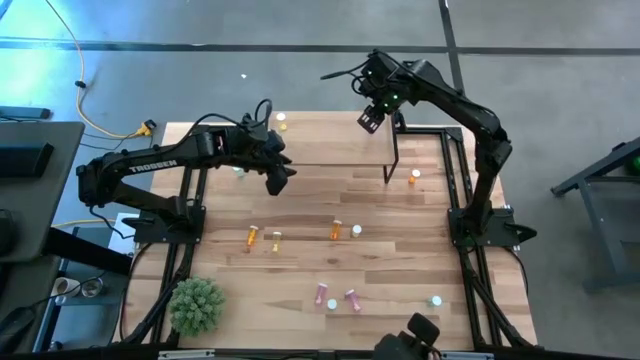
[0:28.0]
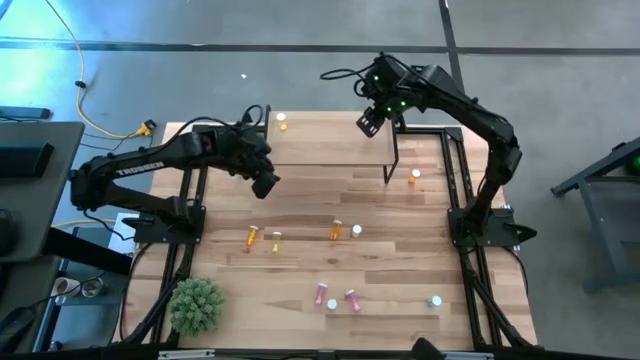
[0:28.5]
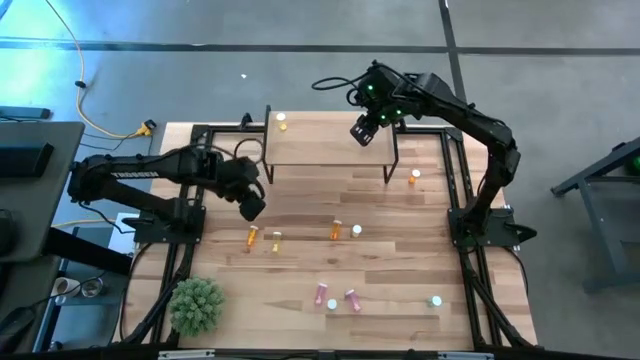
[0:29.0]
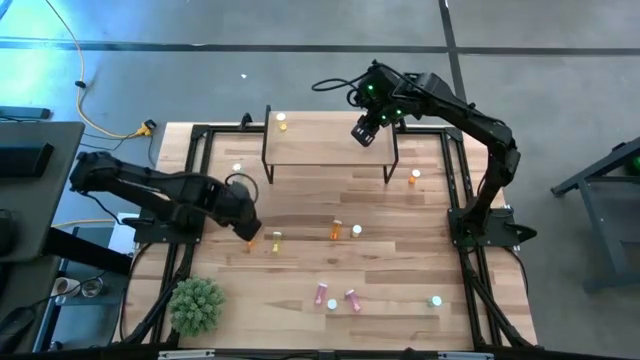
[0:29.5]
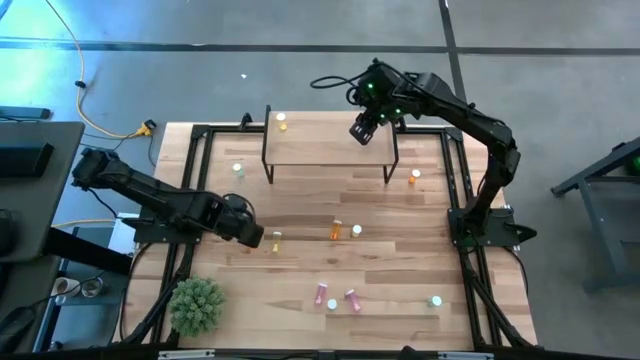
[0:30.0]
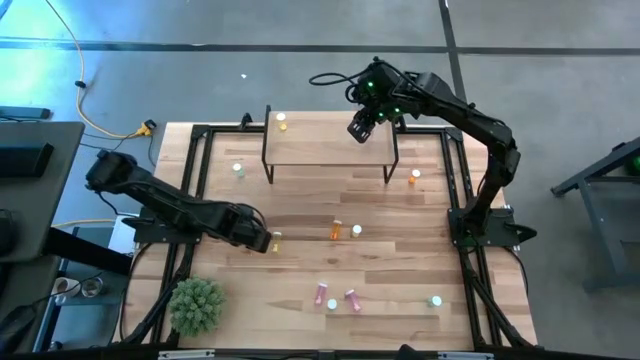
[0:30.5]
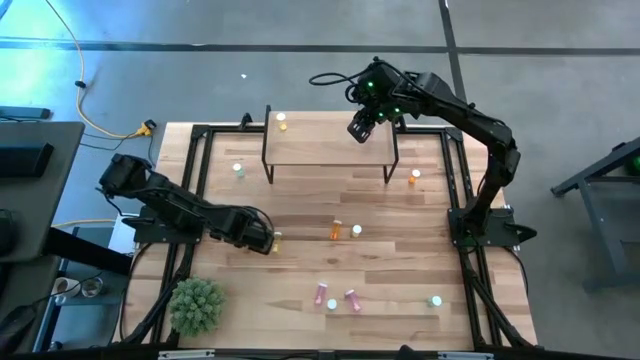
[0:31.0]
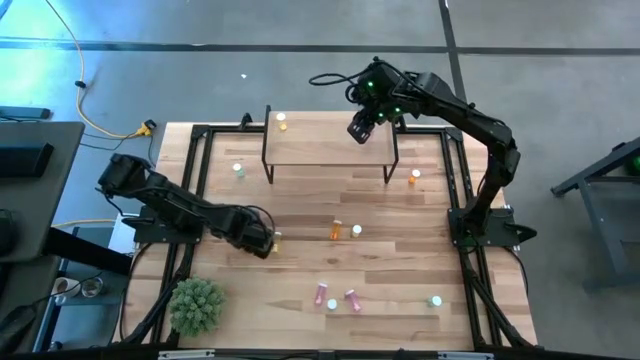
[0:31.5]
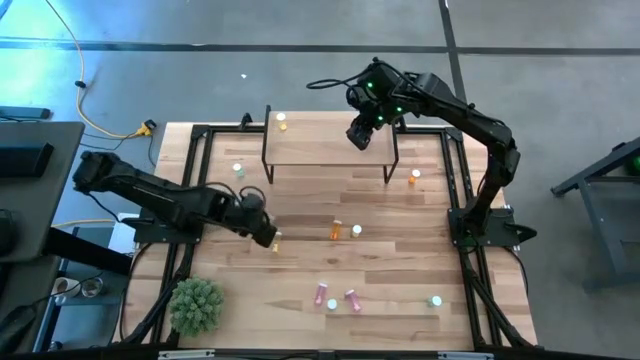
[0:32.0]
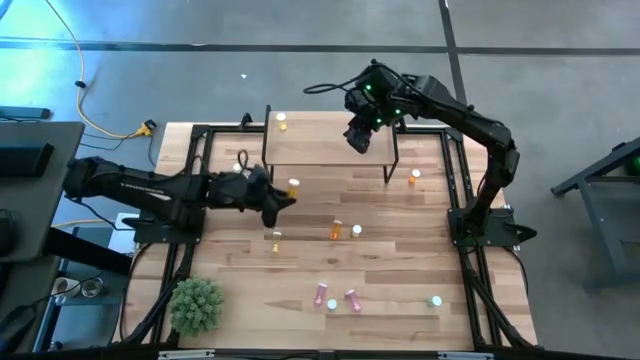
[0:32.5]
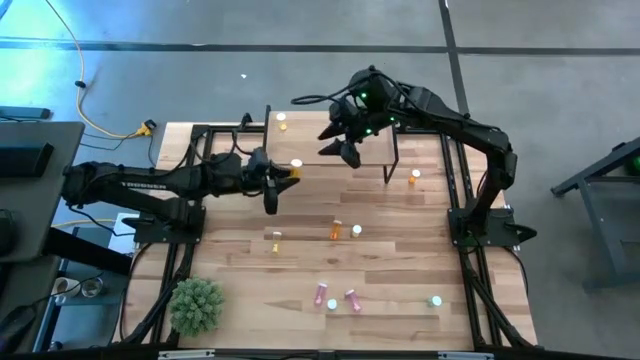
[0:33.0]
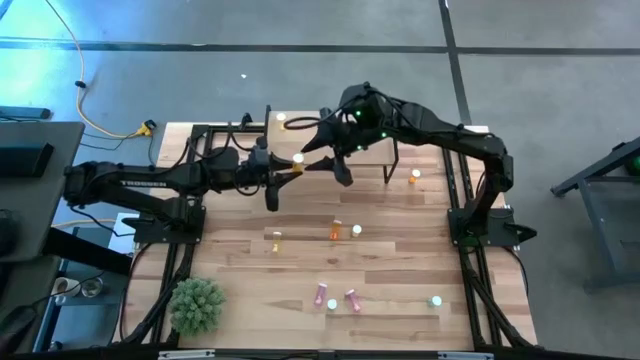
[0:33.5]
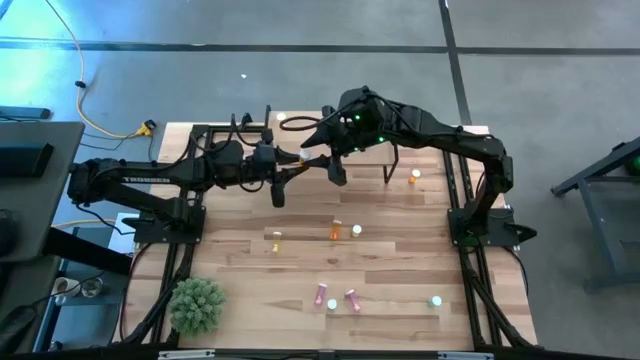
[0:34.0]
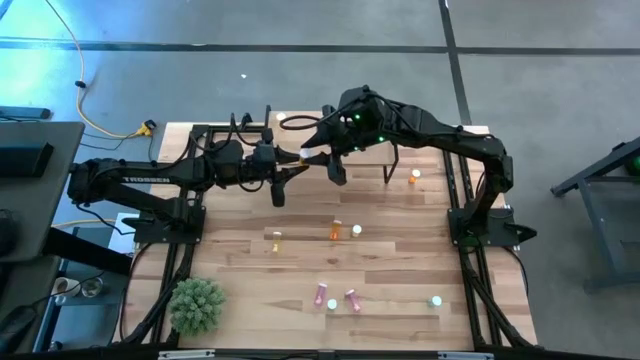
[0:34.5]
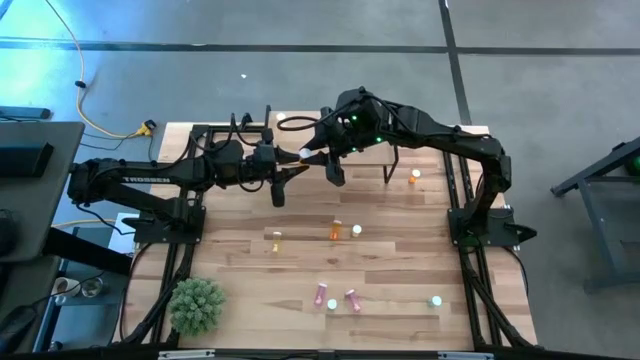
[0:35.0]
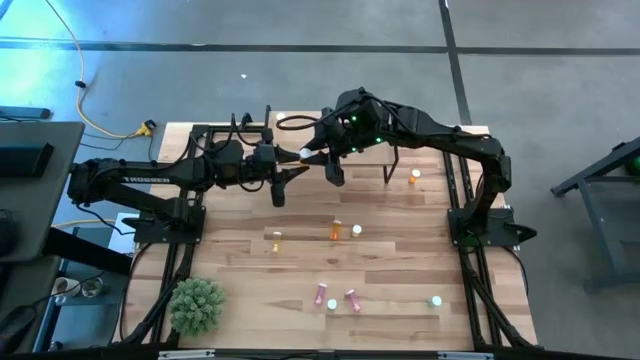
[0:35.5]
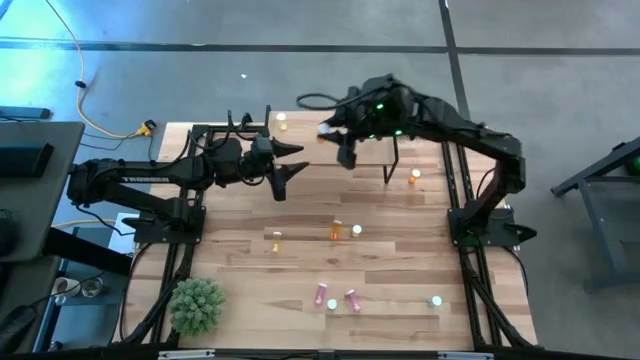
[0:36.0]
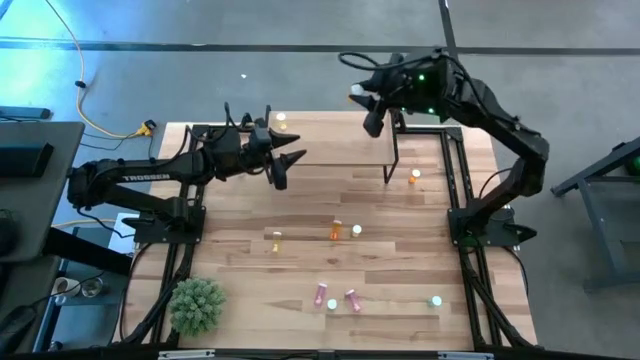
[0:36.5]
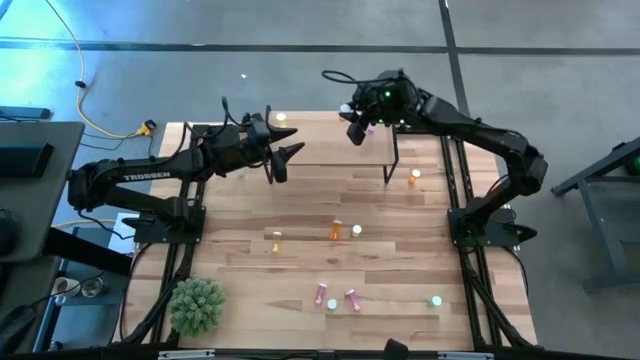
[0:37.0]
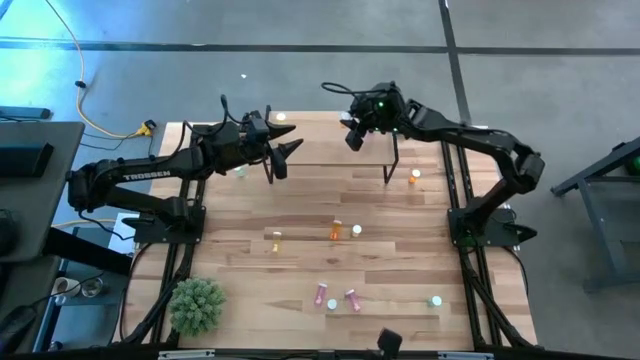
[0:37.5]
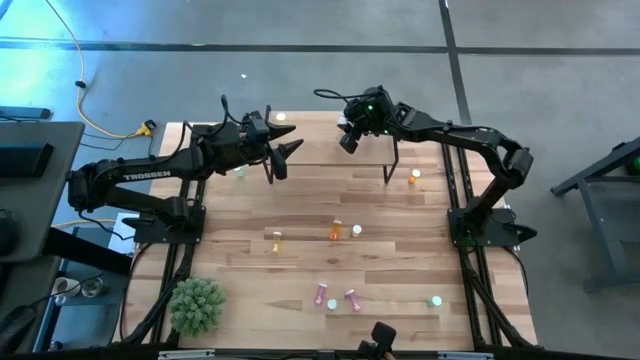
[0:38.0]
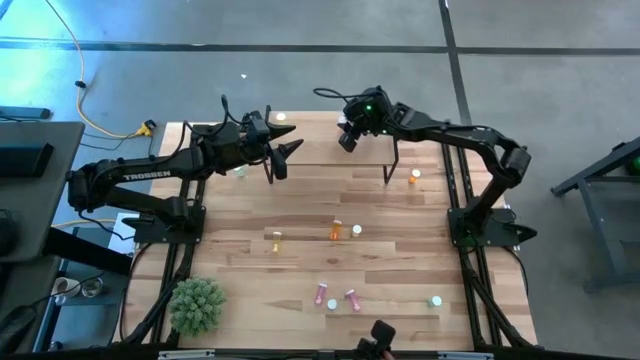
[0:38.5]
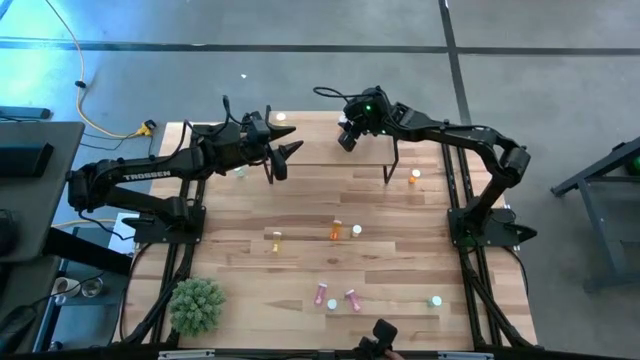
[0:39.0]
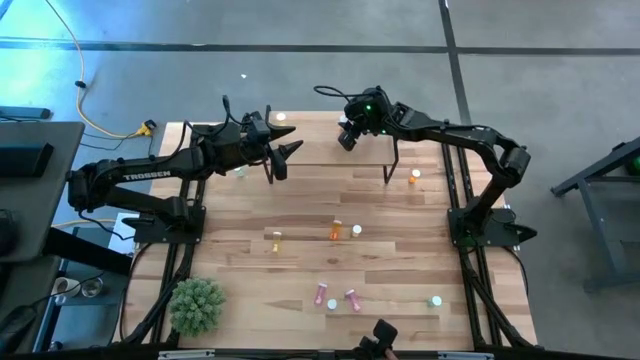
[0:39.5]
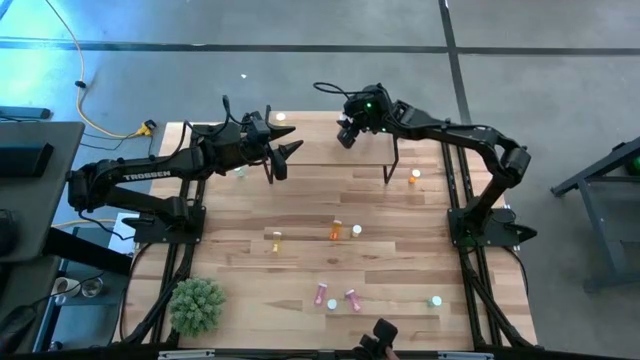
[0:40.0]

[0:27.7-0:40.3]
Task: Pick and place medicine bottles onto shelf by color
Put the bottom left orange pill bottle on the shelf

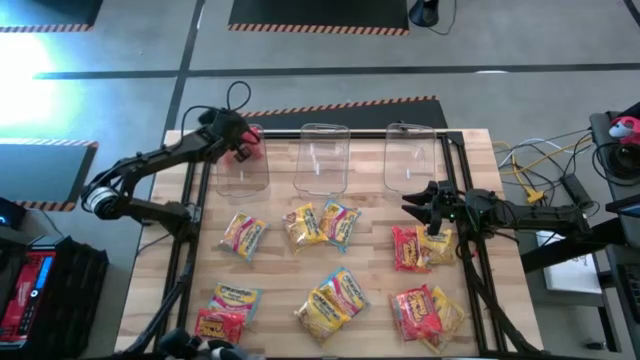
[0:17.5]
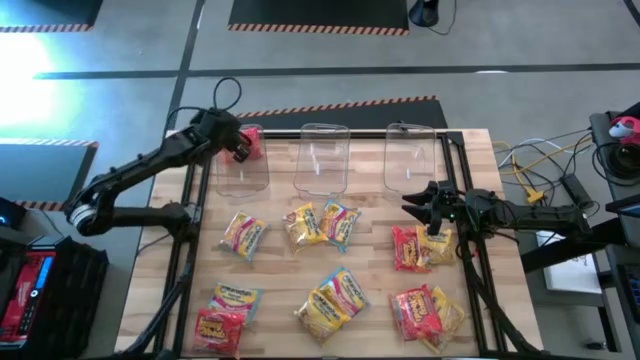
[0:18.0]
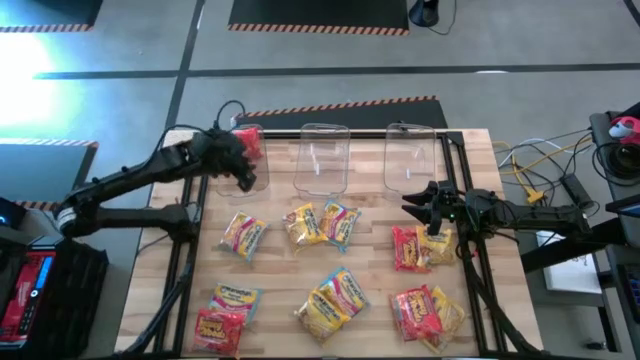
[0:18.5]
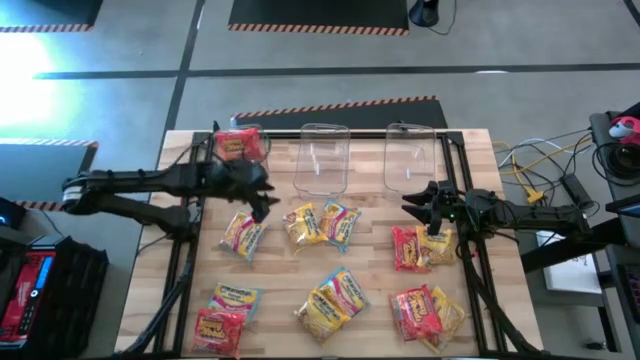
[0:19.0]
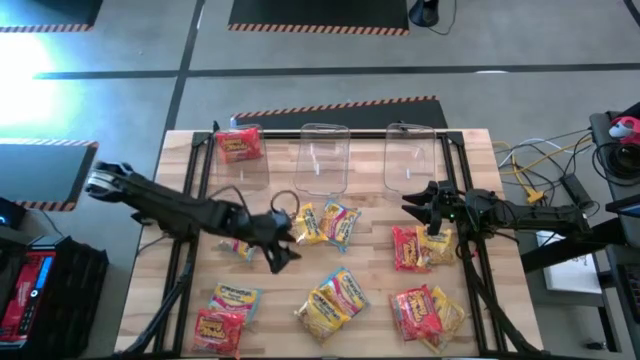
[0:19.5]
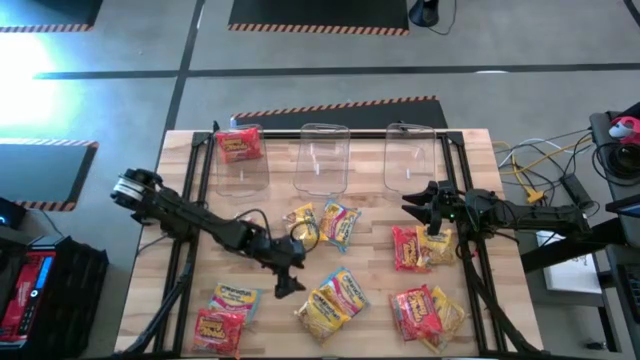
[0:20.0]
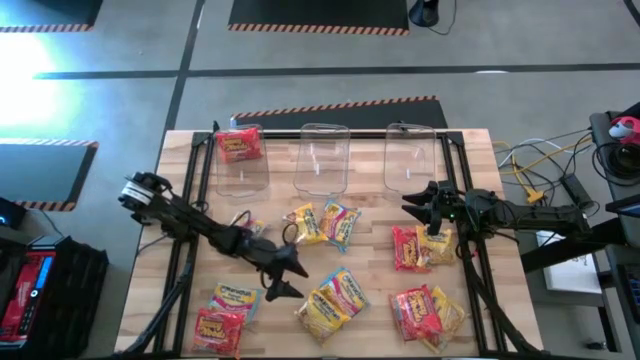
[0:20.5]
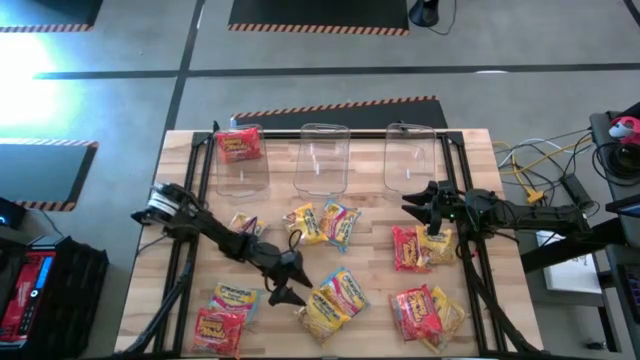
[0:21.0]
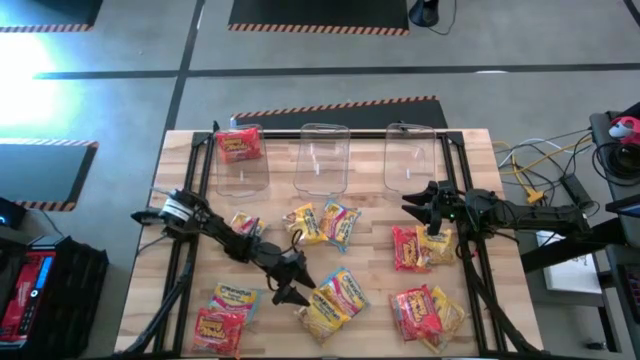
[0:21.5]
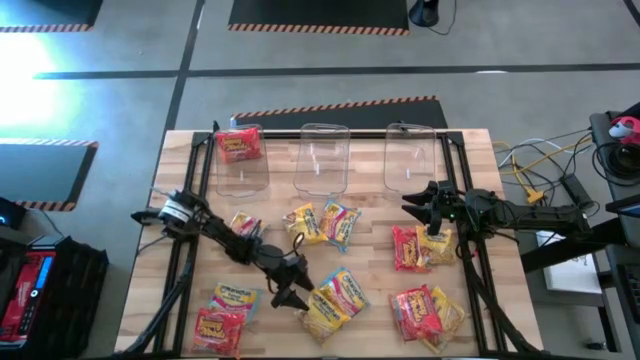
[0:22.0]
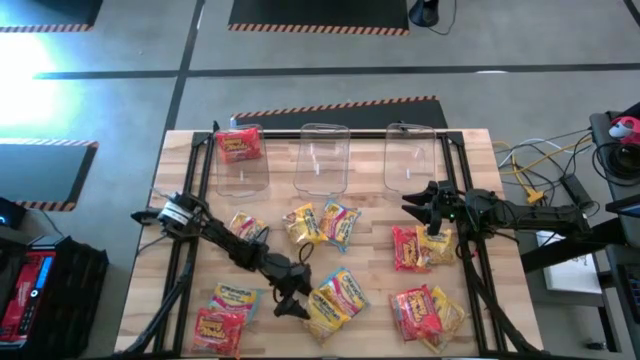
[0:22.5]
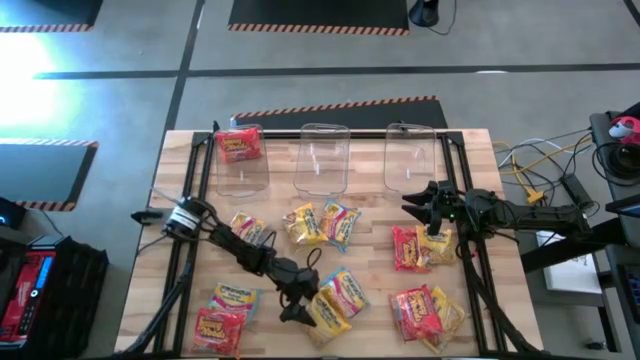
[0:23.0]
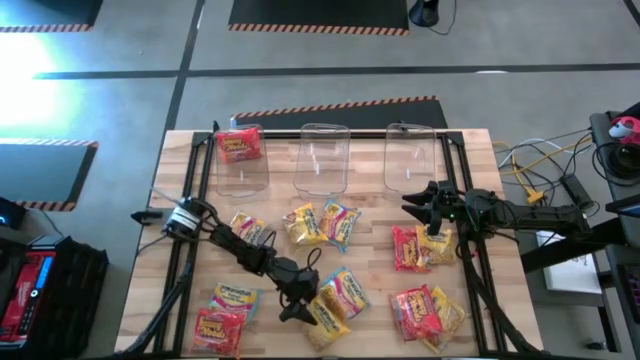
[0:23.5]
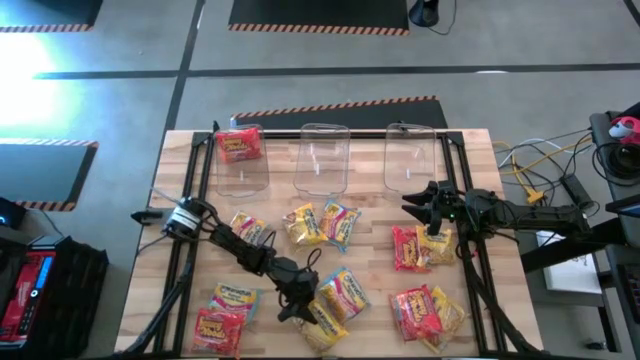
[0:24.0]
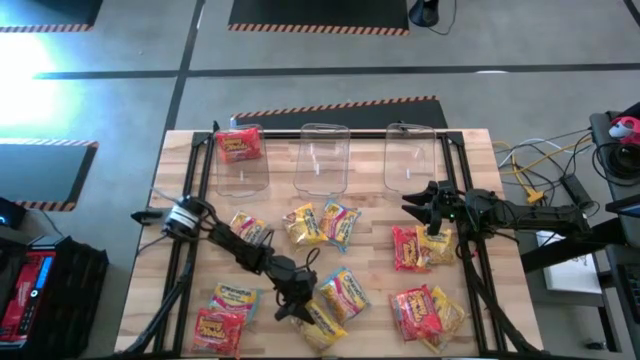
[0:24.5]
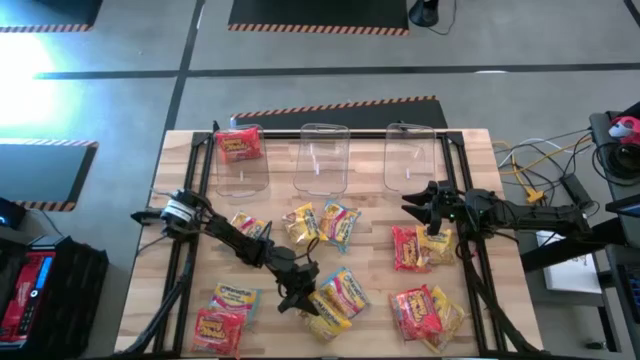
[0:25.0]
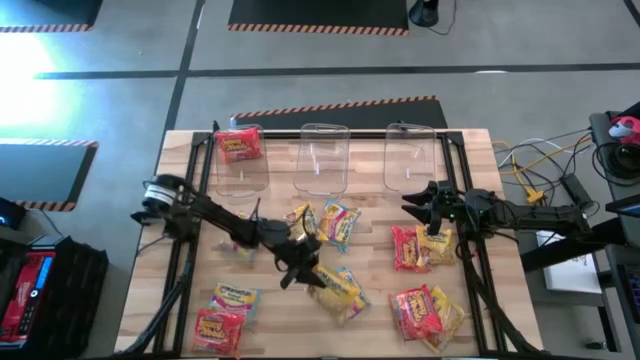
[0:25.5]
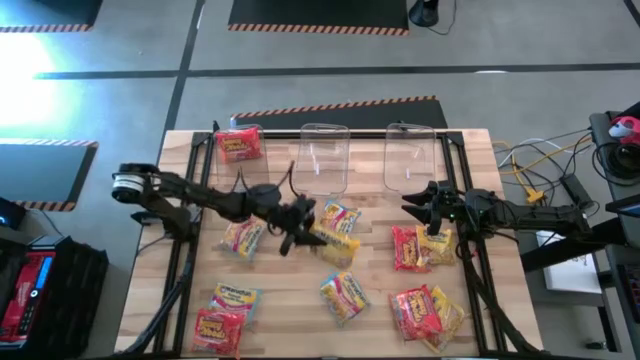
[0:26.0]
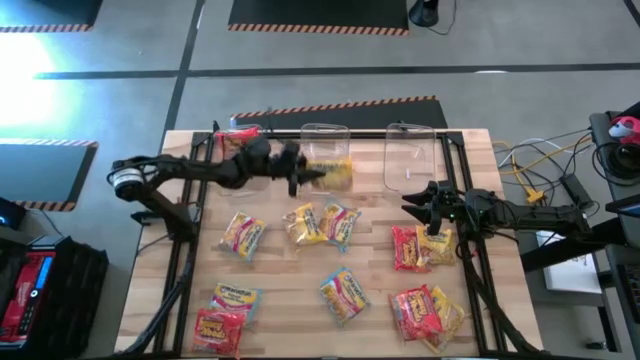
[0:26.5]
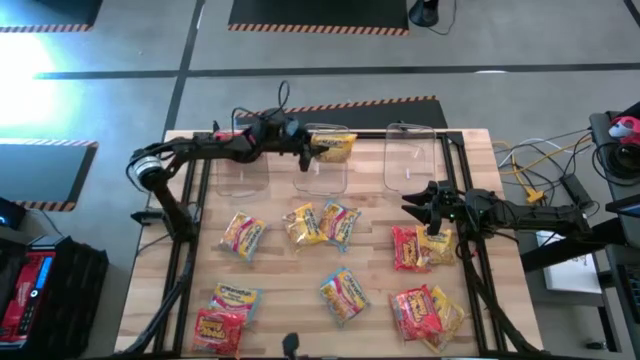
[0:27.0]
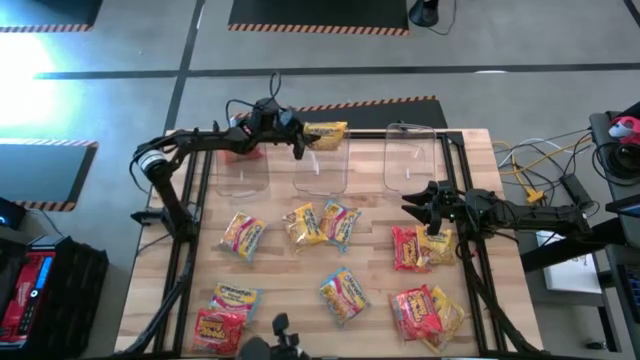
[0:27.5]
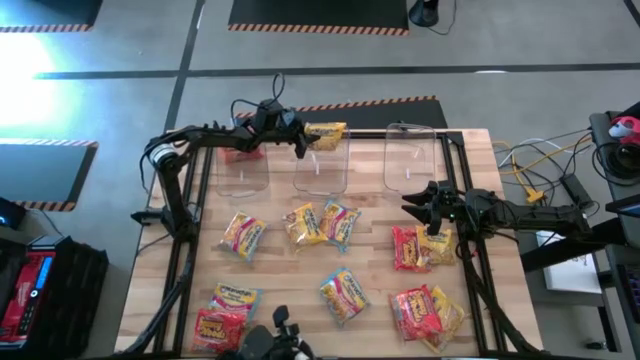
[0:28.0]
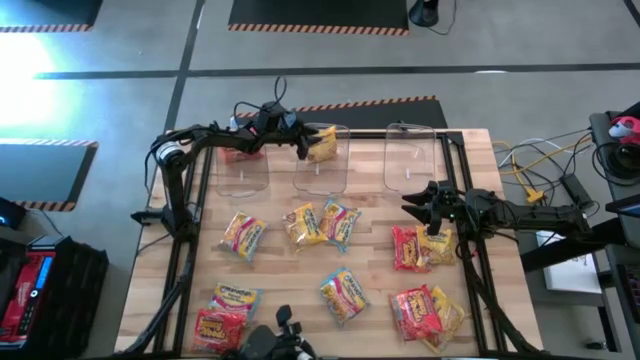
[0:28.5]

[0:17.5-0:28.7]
Task: Sort Maruchan noodles
Put the yellow noodle pack into the middle transparent bin
